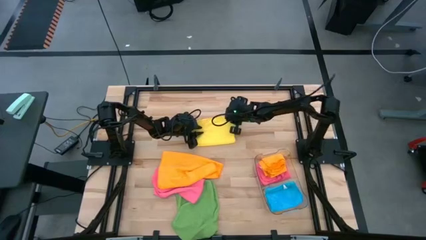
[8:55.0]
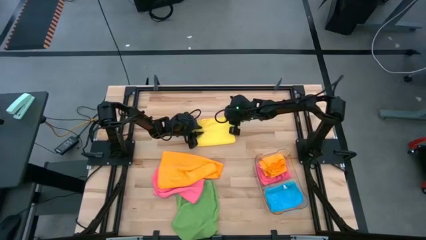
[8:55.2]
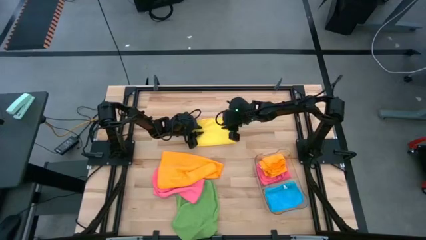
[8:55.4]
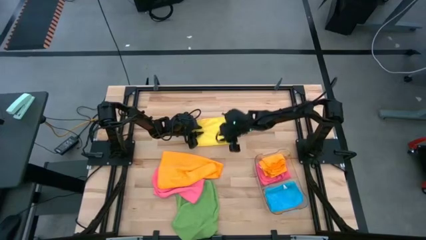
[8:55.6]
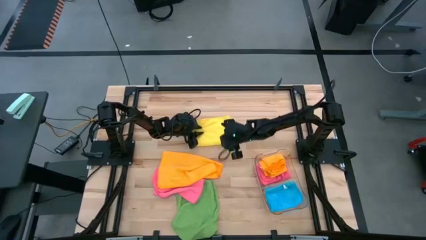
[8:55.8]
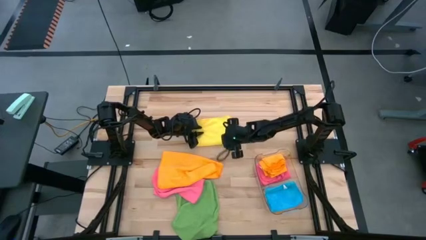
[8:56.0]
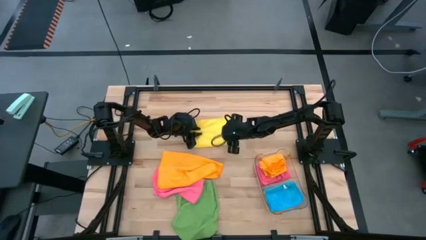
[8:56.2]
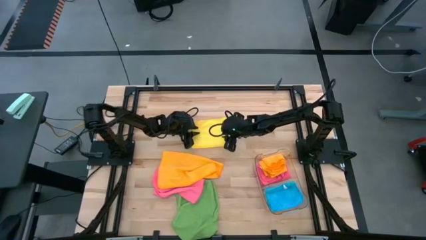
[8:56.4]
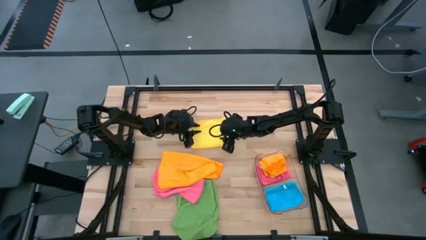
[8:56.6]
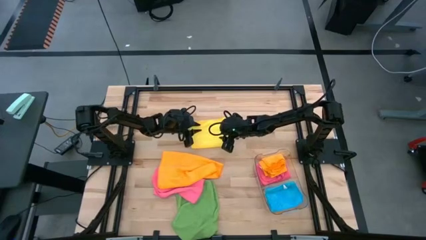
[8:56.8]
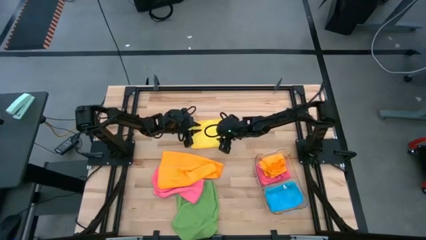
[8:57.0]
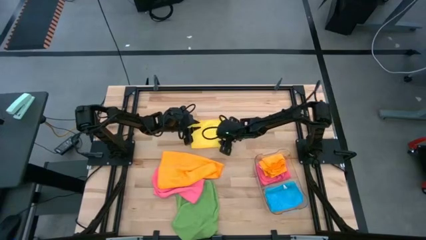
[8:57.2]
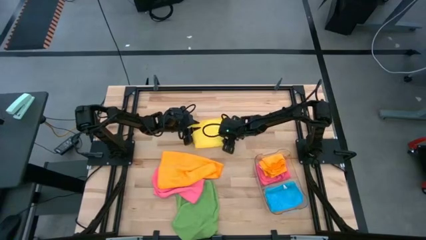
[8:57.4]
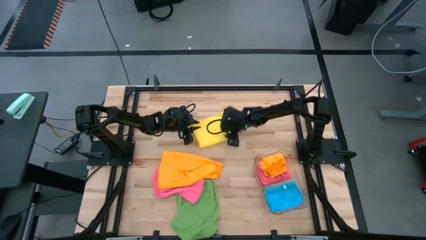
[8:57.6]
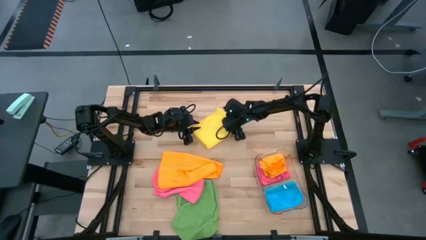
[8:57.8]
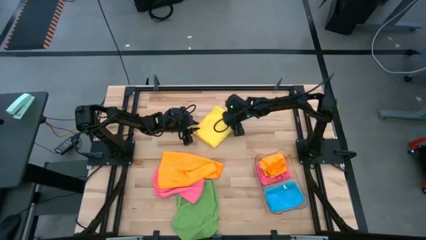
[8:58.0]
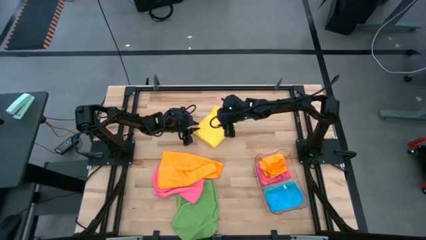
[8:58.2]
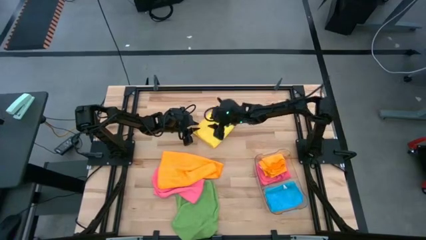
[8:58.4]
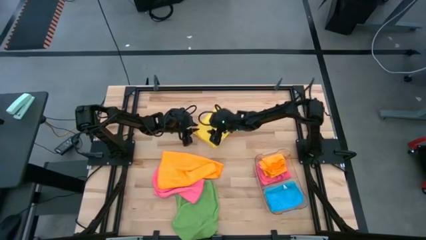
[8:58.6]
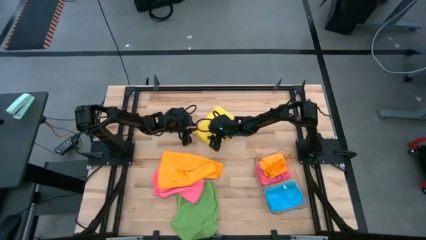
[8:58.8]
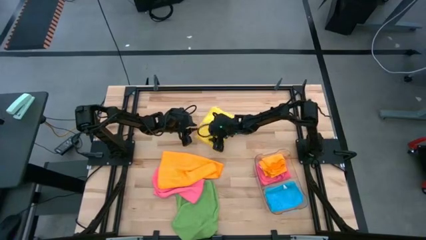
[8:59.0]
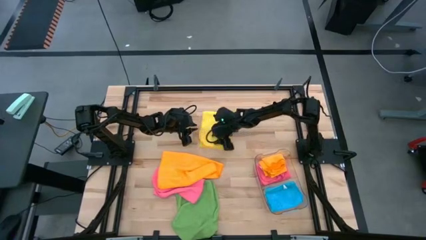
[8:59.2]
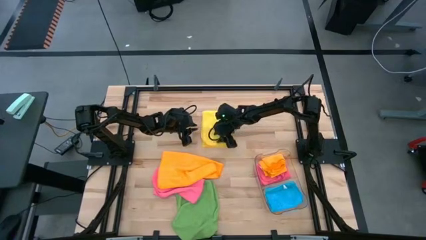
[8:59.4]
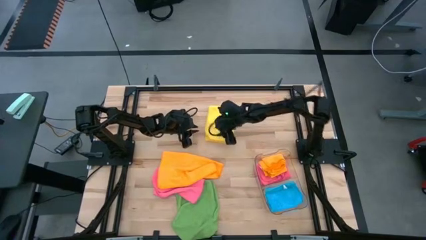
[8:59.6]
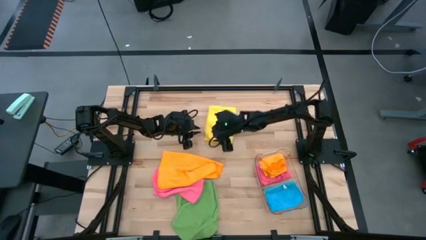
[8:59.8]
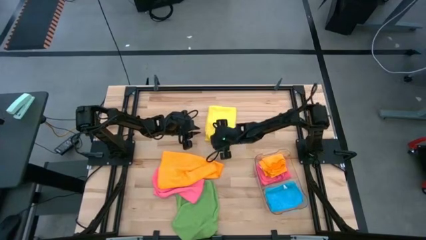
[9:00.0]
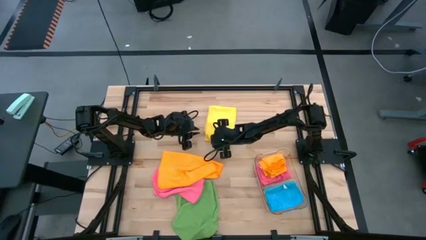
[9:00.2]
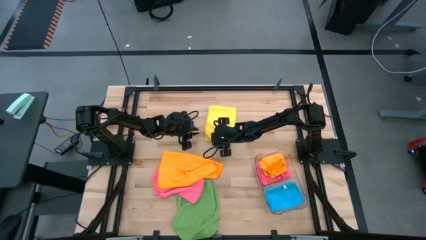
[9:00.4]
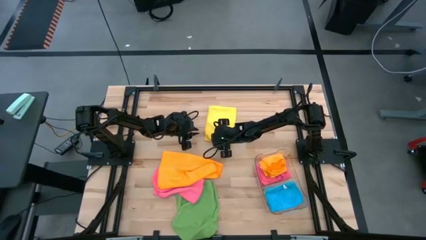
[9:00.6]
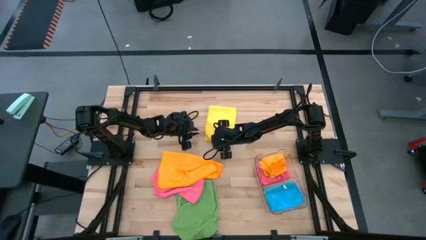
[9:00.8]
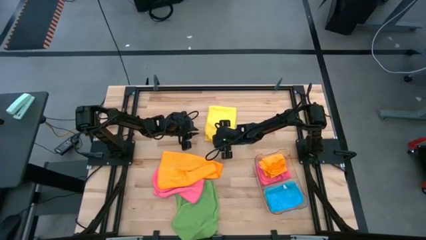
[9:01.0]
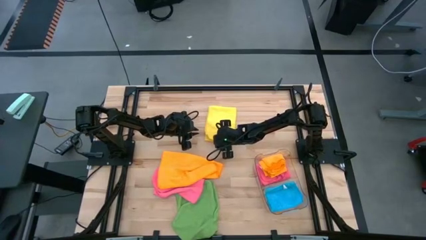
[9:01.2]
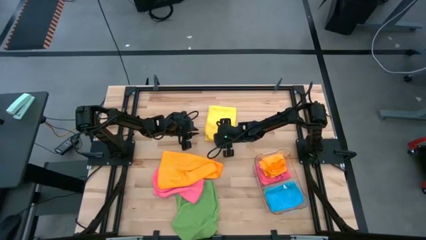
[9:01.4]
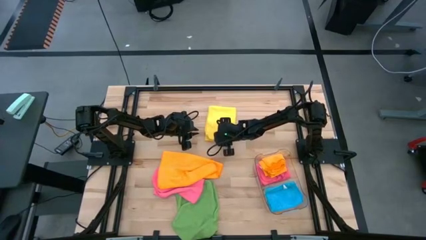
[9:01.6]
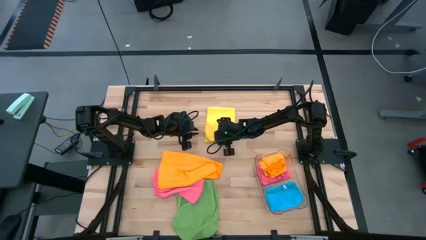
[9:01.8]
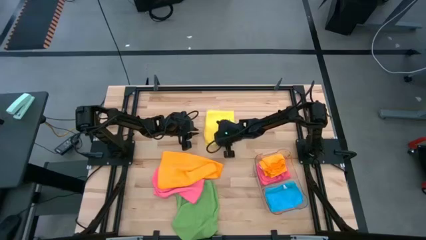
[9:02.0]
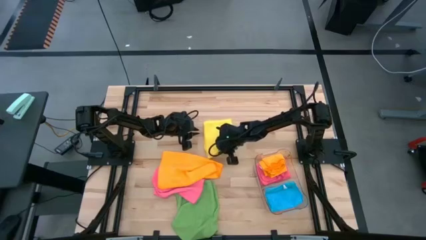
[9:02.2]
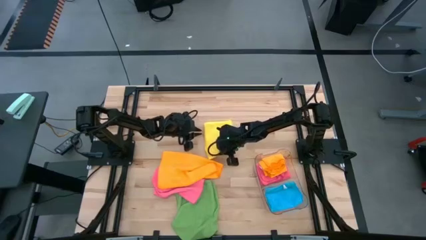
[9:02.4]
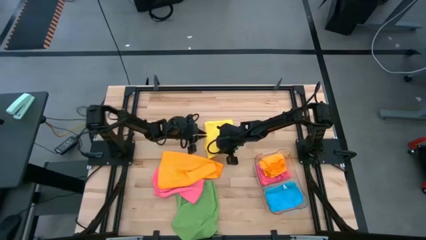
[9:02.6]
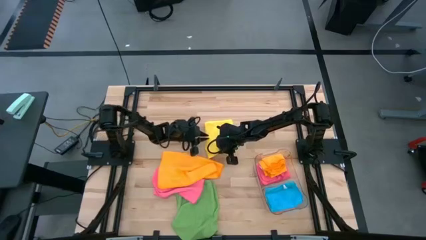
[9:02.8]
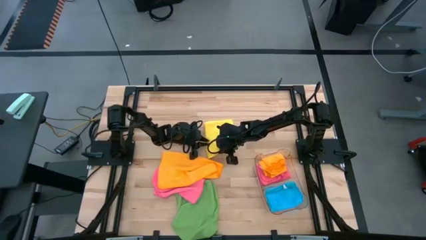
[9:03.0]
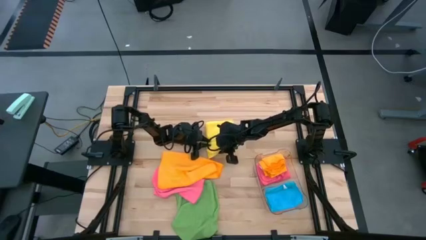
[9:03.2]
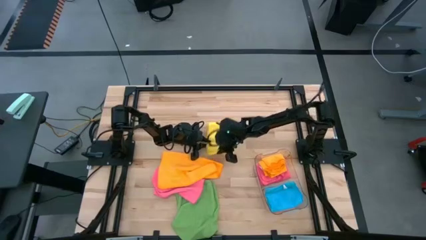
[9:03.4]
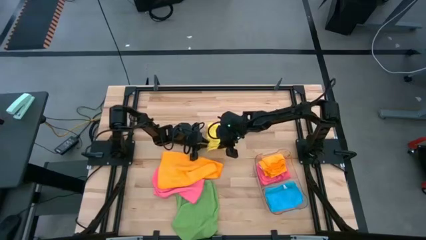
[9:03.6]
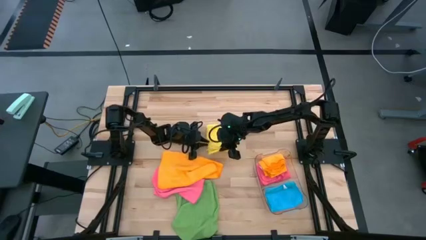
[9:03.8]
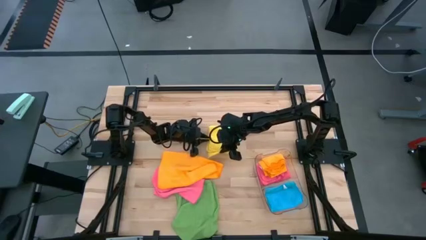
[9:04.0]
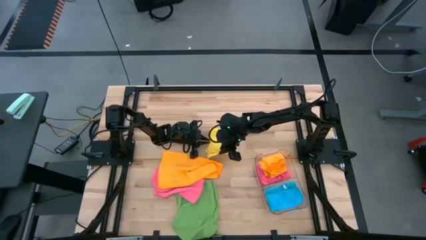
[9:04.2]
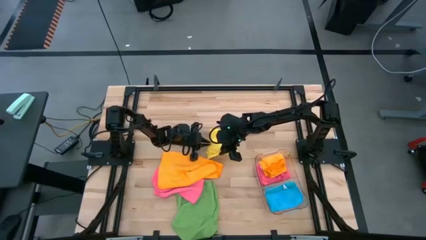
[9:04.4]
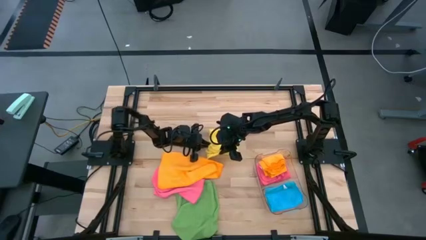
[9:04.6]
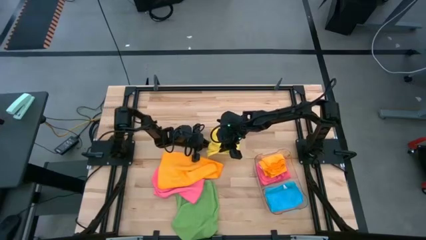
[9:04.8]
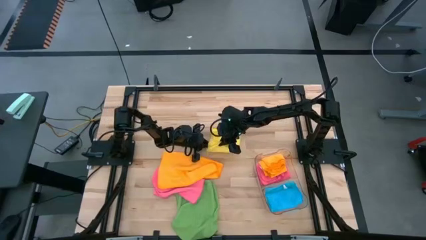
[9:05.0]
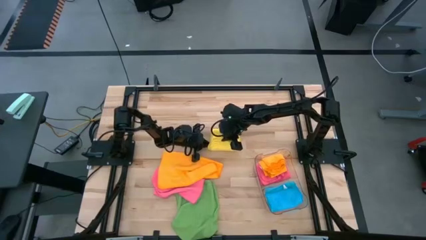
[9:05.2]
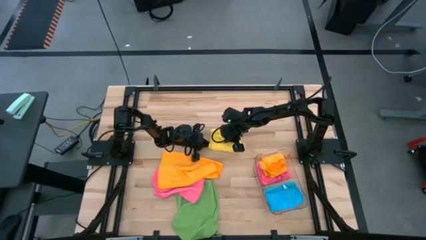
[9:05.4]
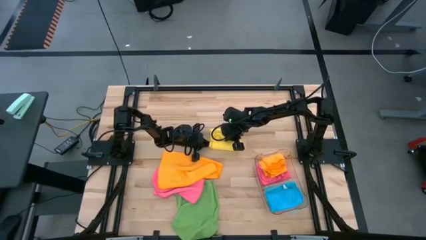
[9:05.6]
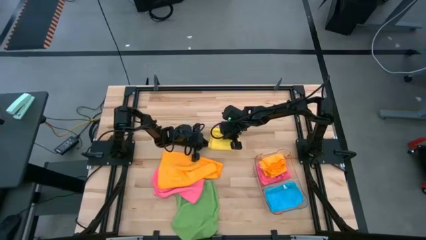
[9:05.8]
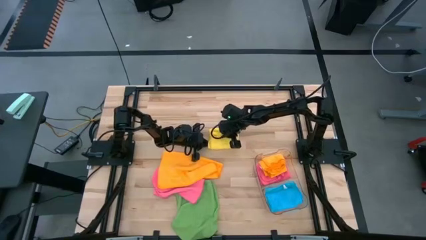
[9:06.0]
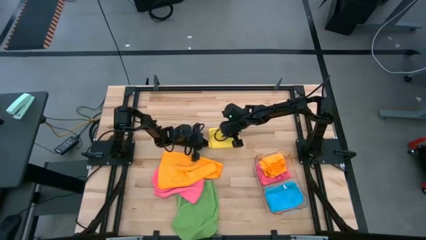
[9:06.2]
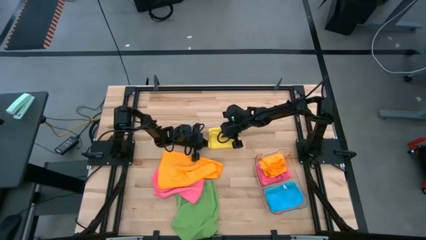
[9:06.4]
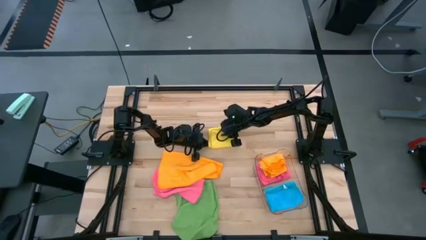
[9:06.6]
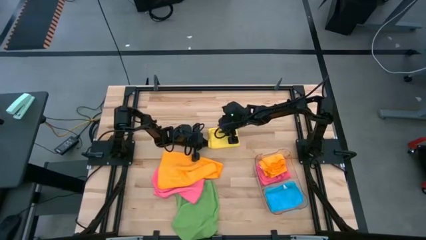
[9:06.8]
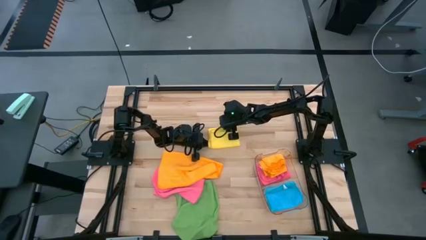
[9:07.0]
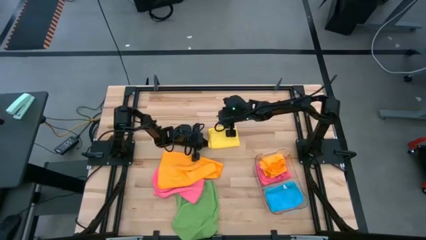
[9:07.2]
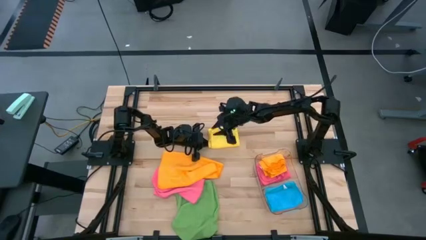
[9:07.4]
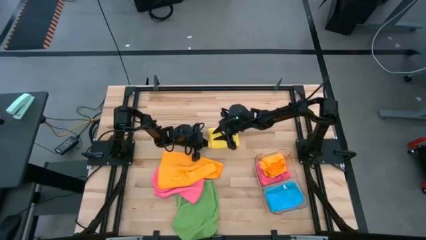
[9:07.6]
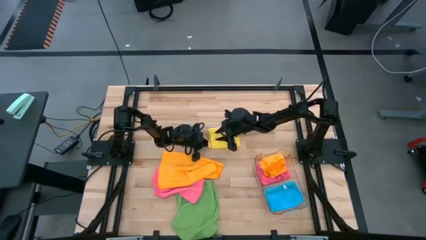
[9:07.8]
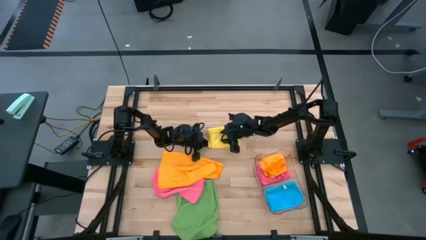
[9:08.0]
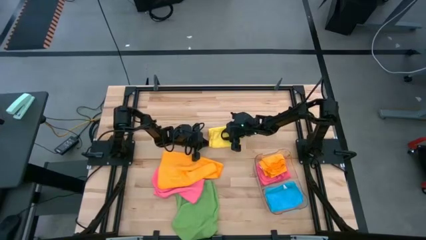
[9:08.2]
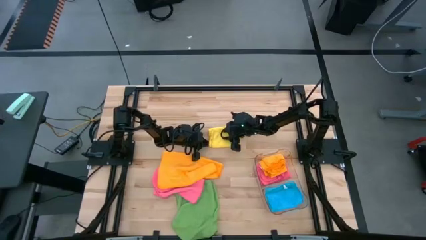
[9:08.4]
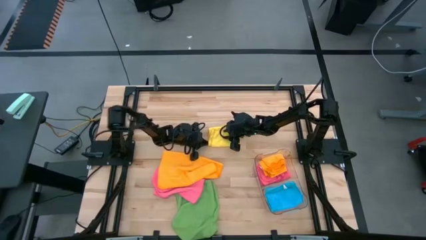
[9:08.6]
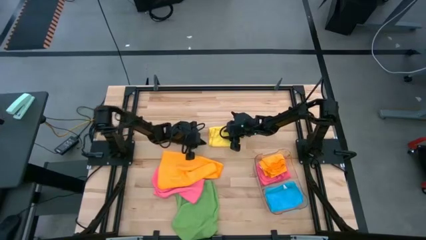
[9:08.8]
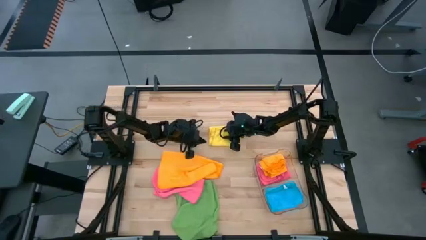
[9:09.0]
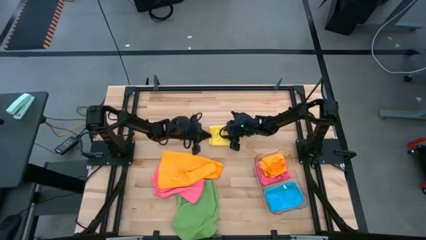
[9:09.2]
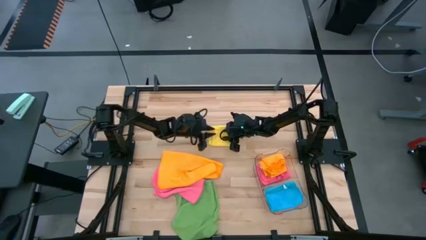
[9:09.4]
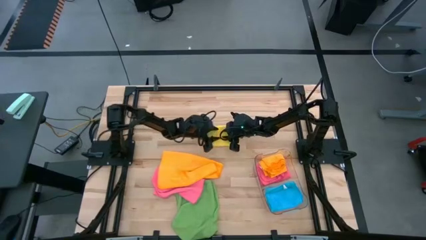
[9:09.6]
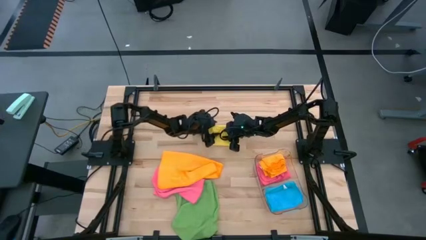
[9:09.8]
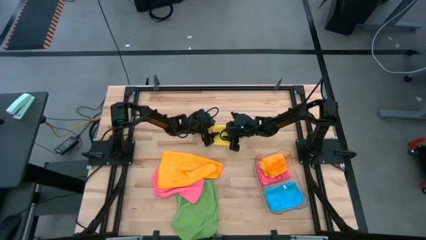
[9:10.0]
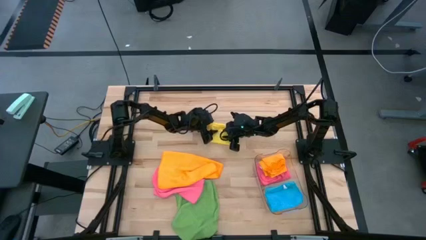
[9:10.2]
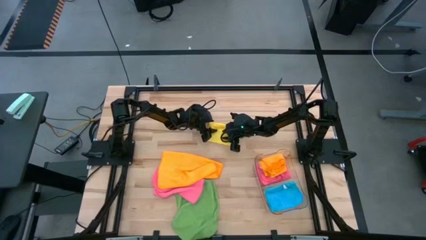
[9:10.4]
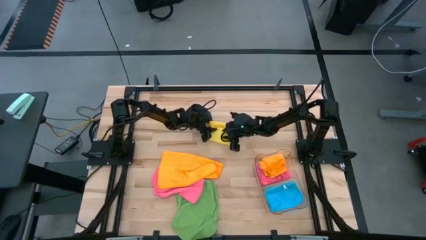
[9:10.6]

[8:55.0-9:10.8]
Task: Fold microfiber towels
Fold the yellow towel
